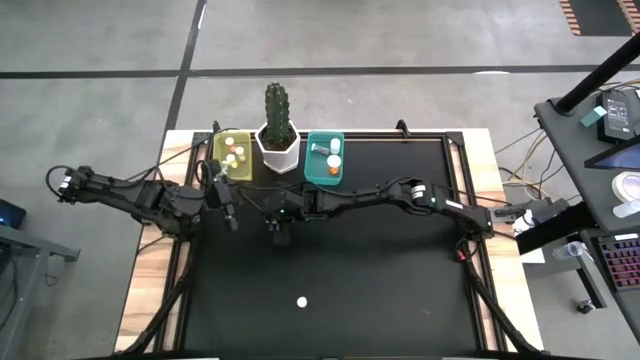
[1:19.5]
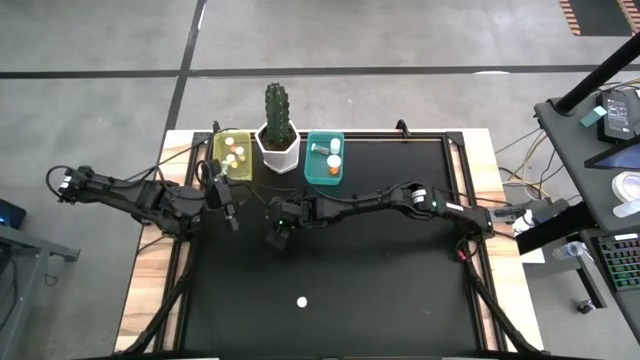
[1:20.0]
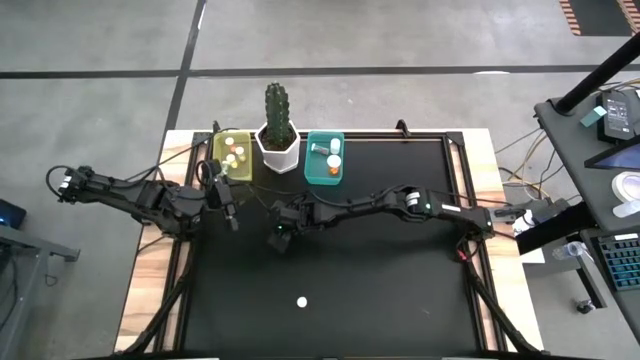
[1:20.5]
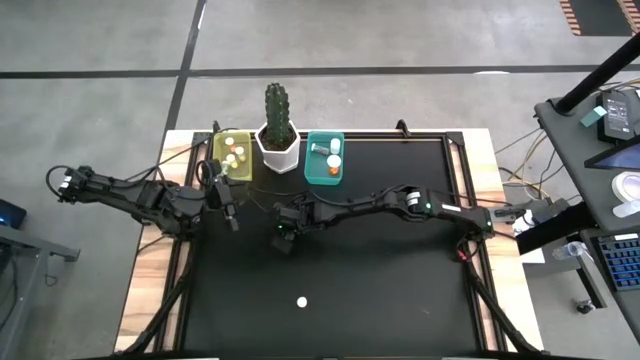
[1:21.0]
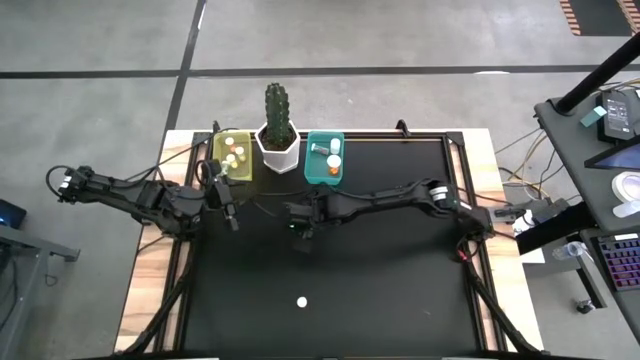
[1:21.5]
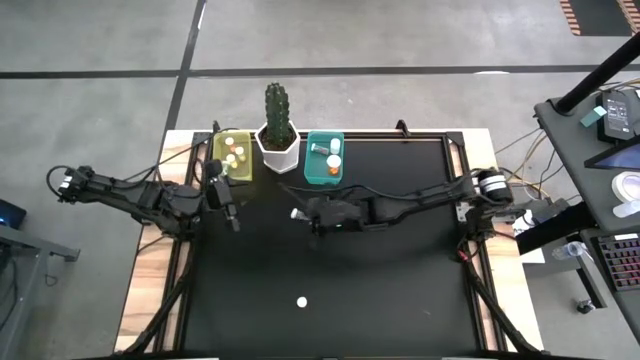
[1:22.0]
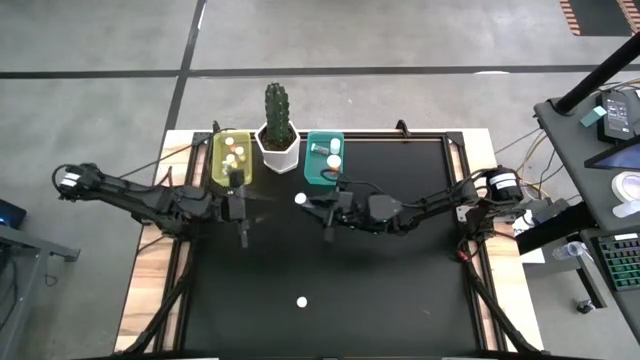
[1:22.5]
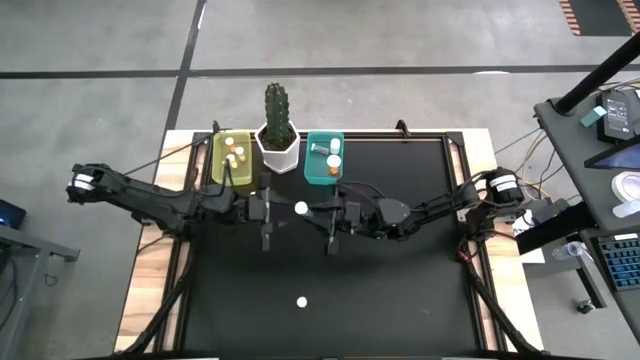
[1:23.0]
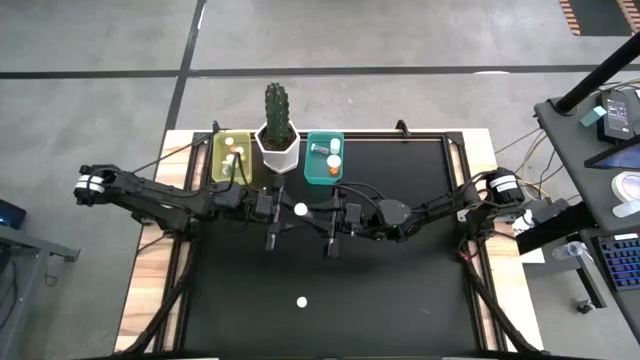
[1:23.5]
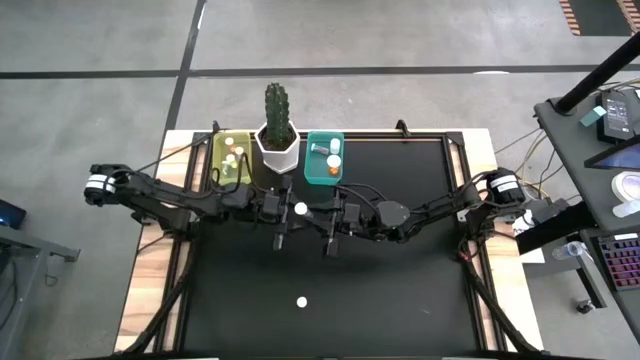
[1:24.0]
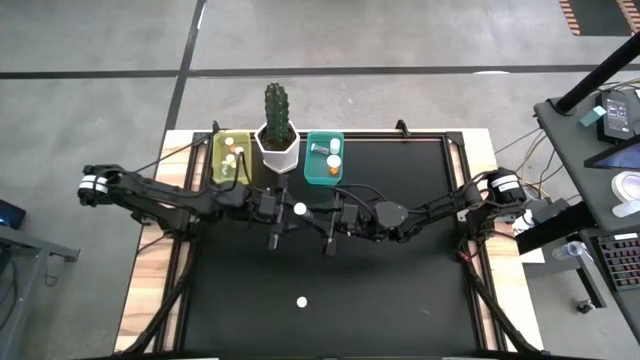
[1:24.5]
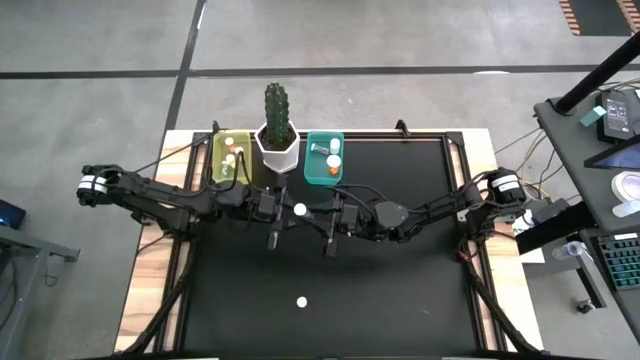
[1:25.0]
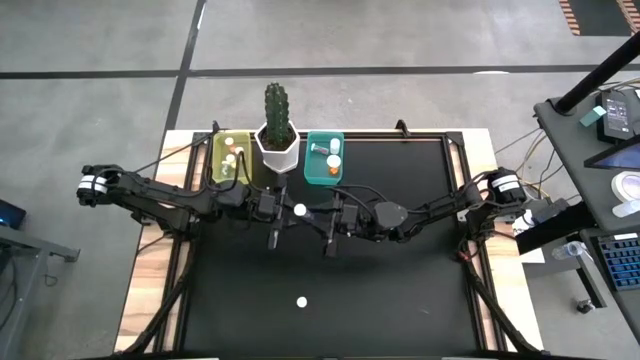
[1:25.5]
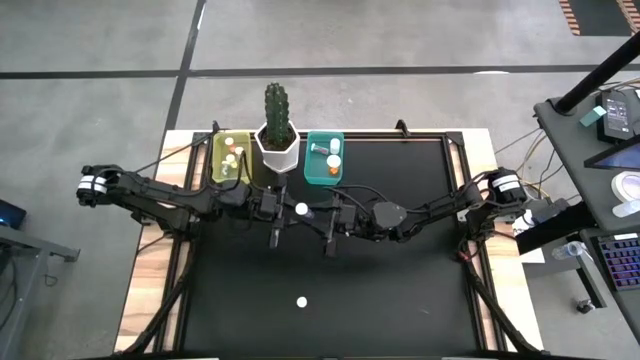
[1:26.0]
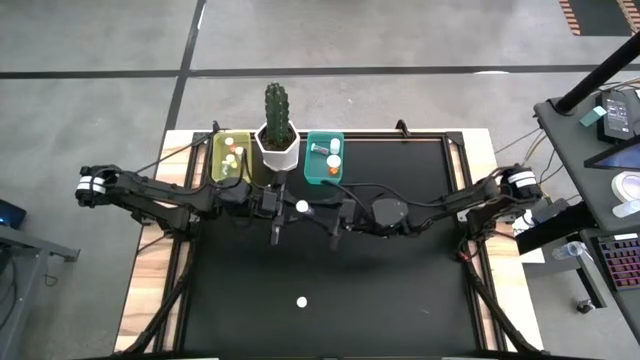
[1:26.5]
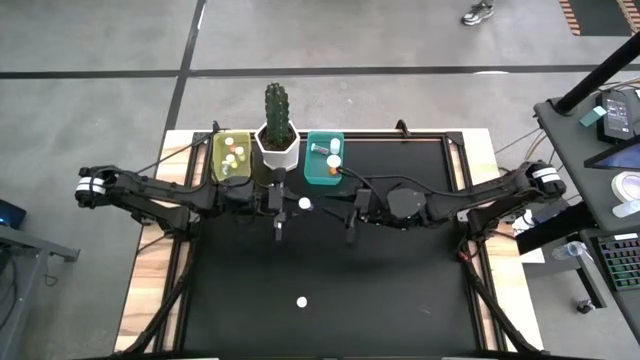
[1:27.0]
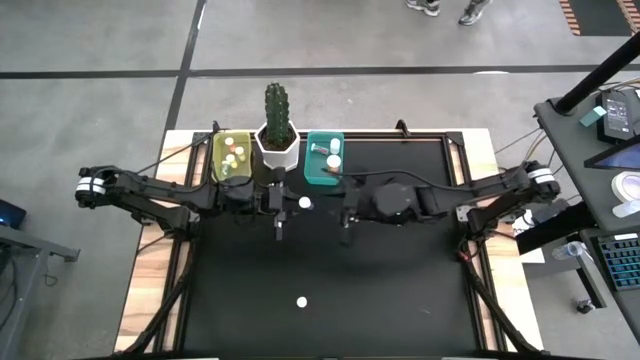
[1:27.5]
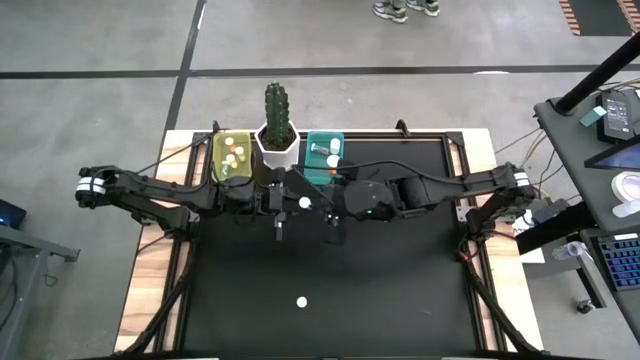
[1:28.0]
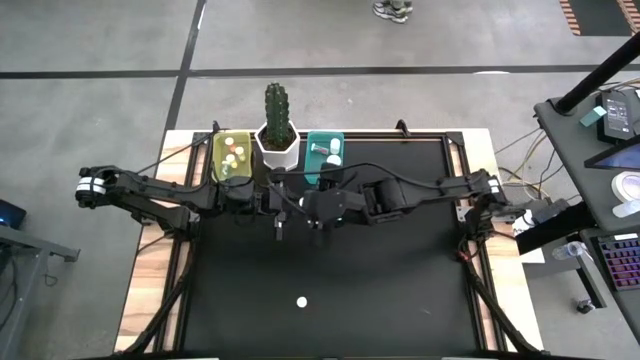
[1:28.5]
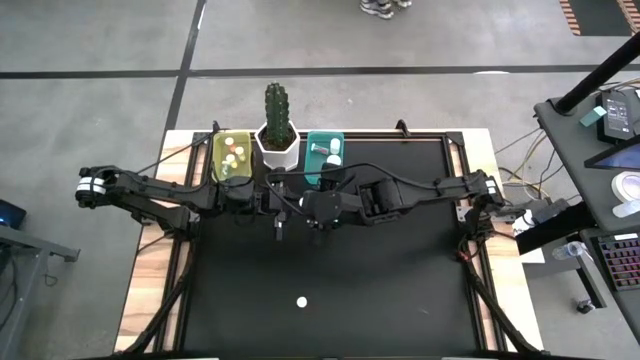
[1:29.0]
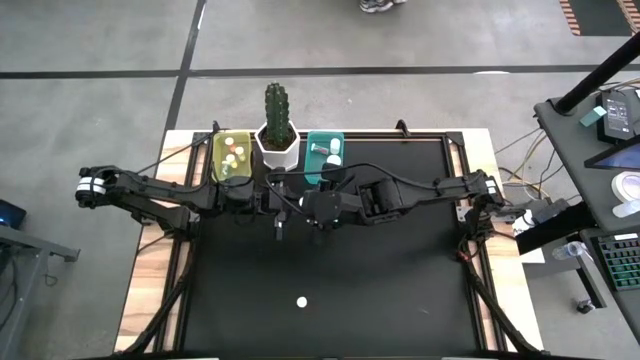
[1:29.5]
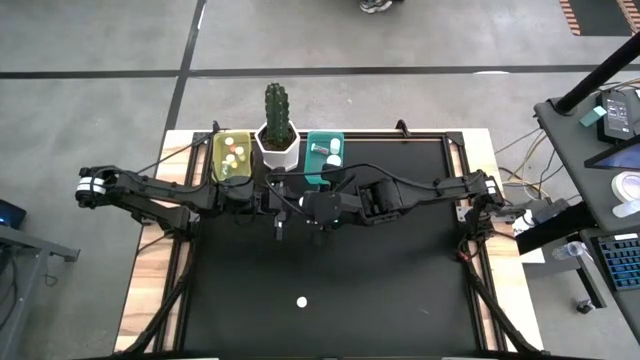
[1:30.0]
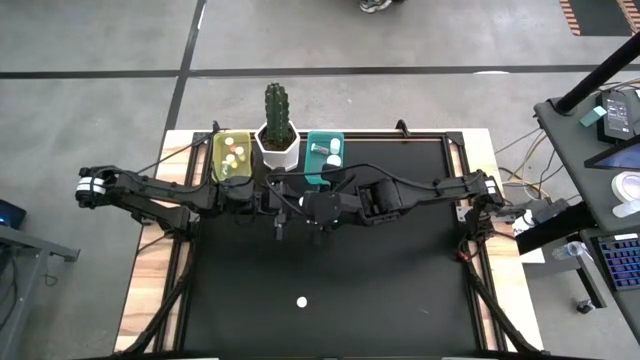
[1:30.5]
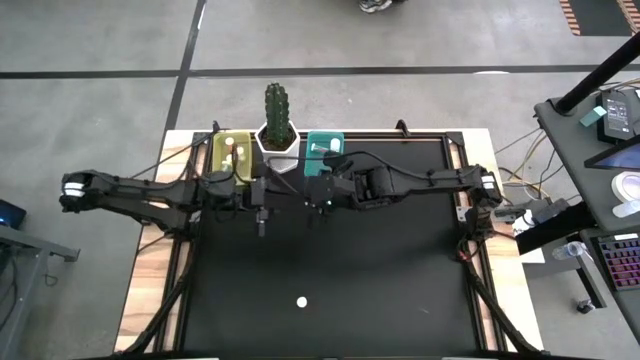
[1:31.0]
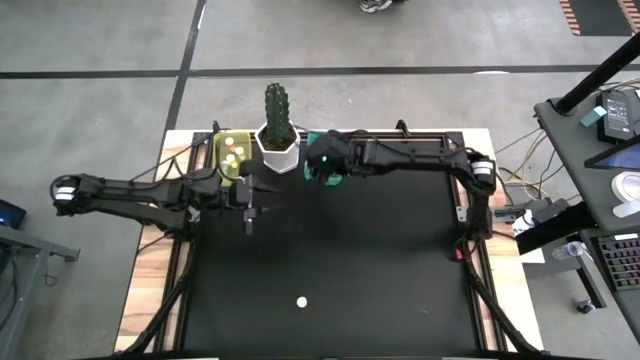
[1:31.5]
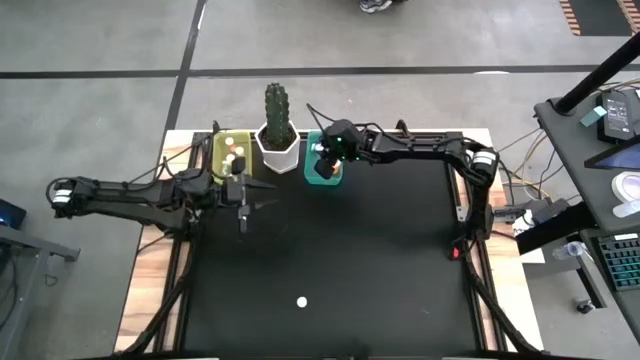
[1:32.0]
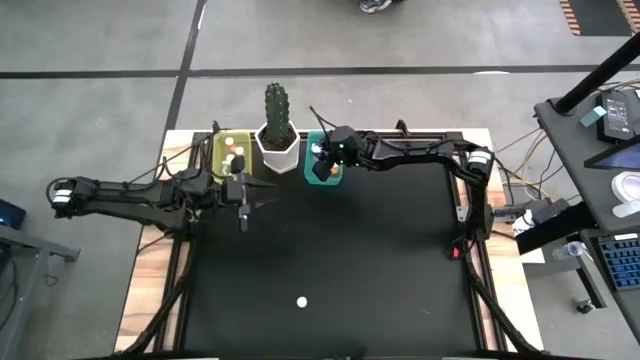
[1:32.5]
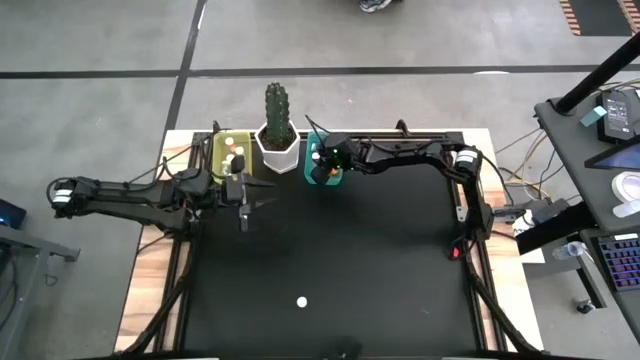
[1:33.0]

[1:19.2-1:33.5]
Task: Pick and place medicine bottles into bin by pill shape (circle, oval)
Put the blue capsule bottle into the blue bin

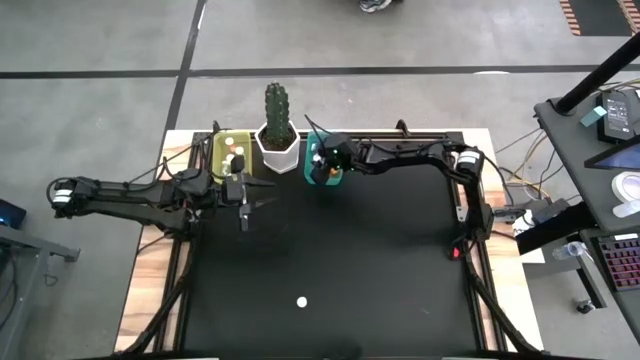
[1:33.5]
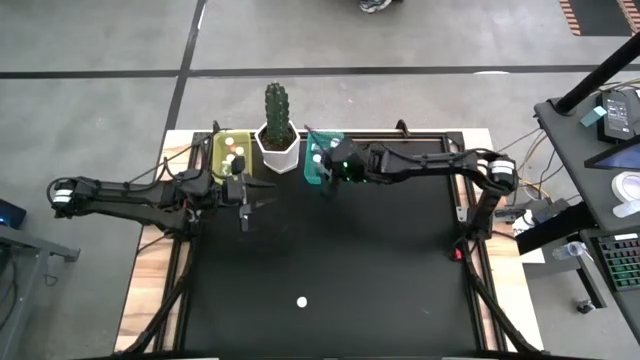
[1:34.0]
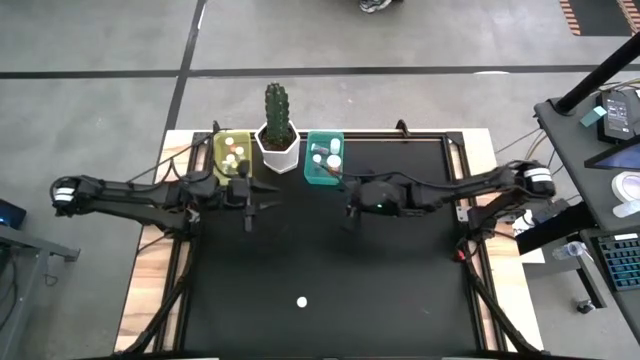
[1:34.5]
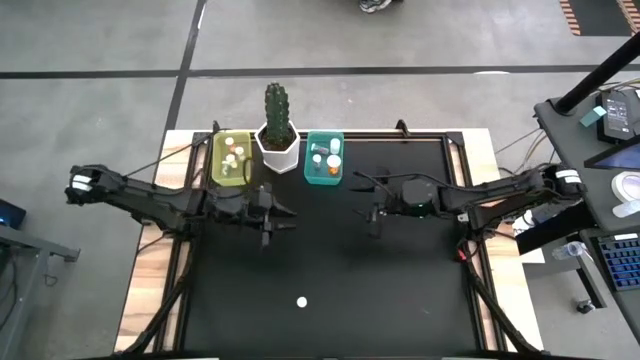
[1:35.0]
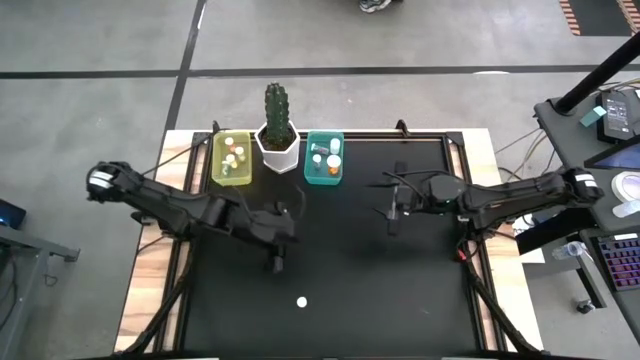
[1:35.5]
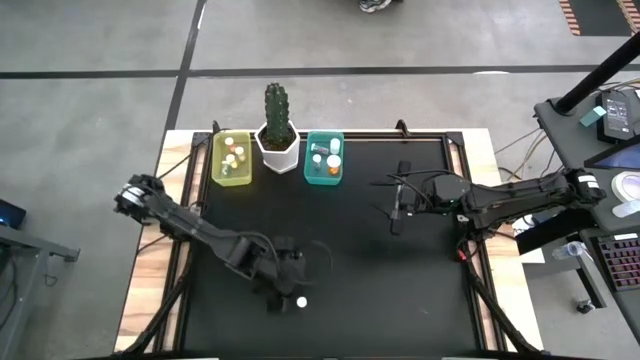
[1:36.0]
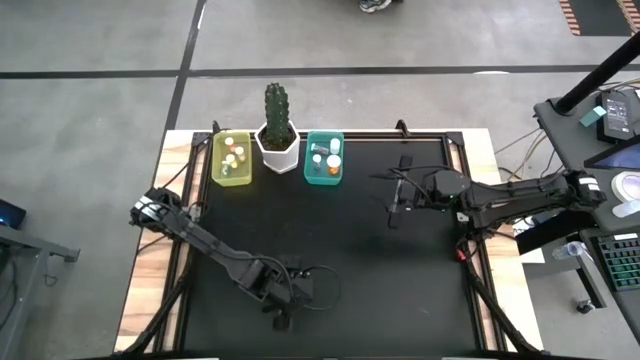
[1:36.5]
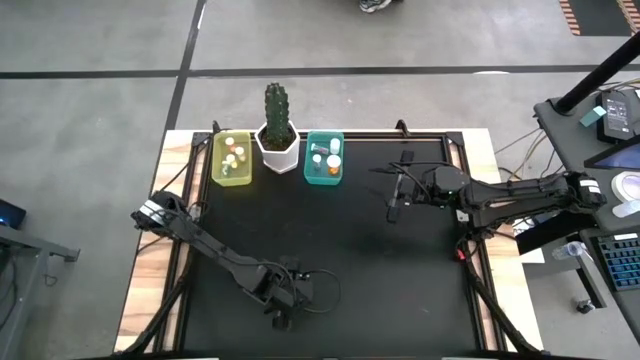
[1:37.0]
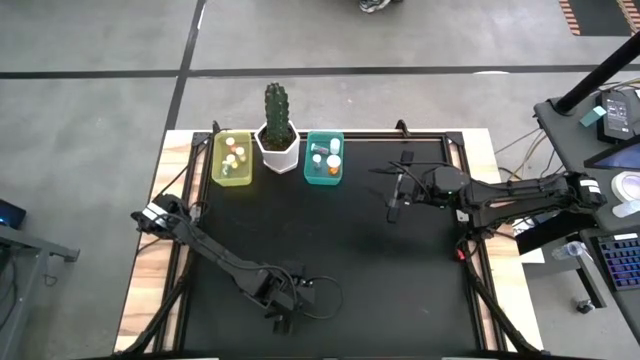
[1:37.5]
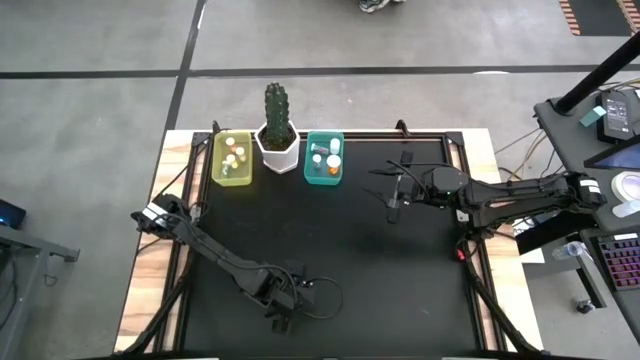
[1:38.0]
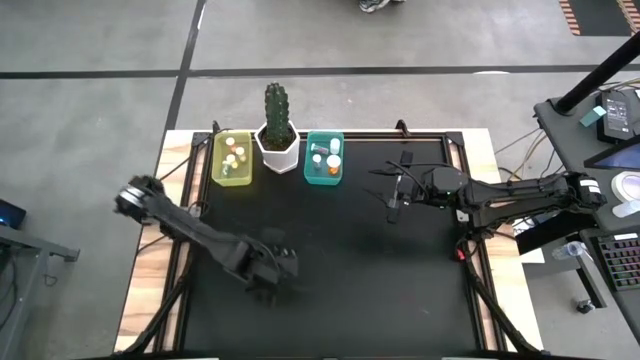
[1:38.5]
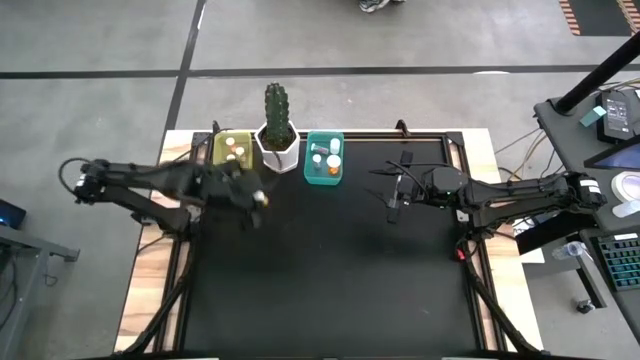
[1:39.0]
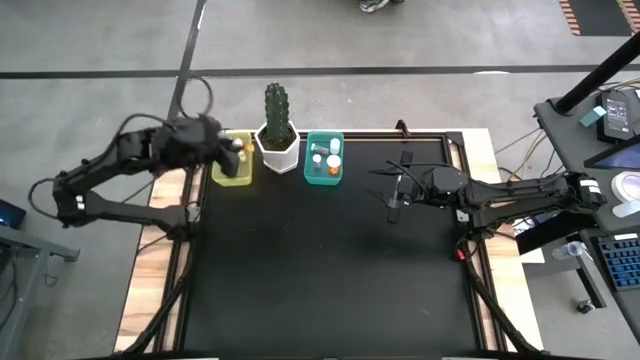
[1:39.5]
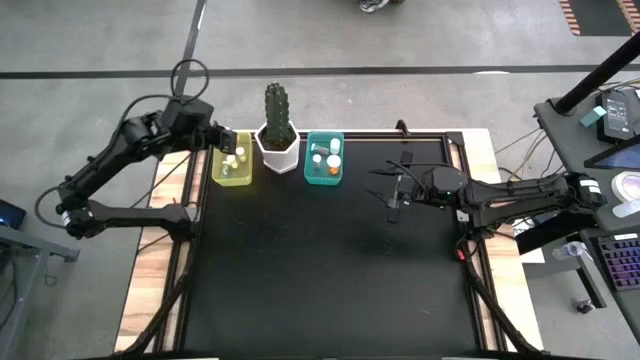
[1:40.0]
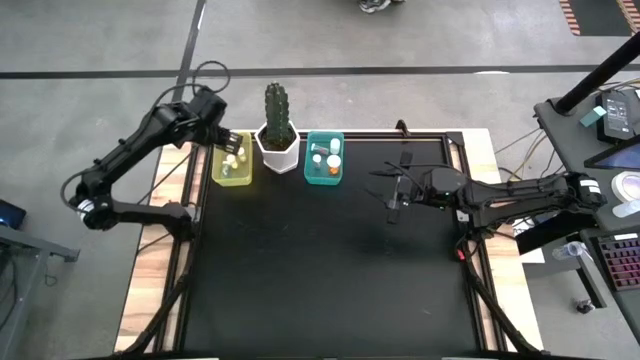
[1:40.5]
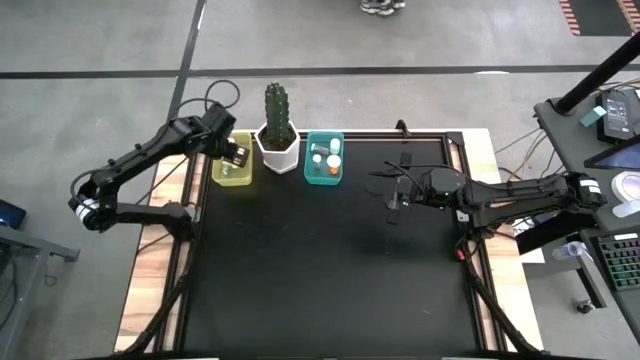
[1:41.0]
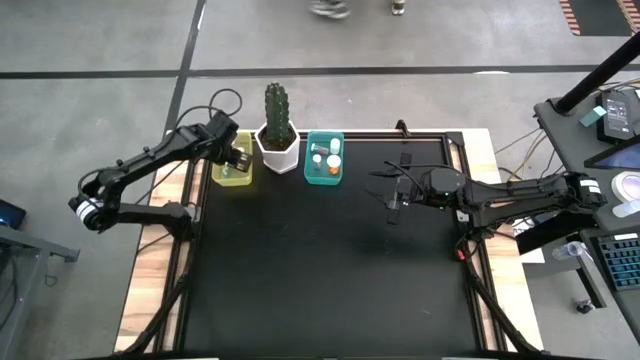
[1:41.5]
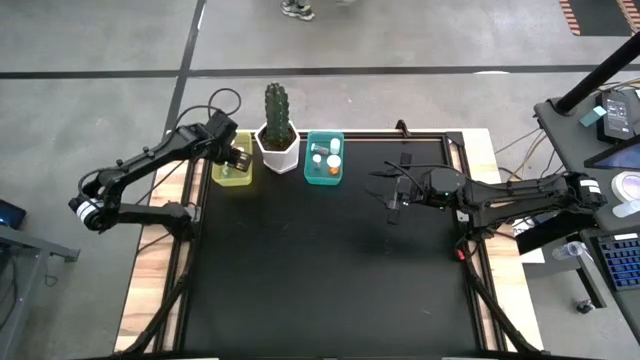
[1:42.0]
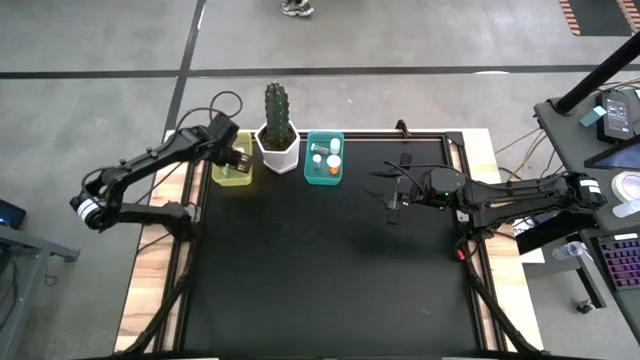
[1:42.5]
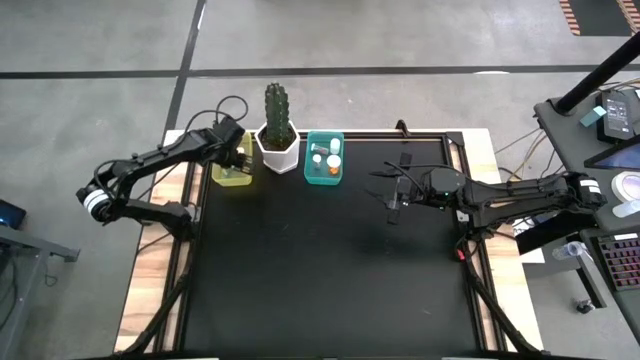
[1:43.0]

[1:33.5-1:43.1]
Put the small orange tablet bottle into the yellow bin
